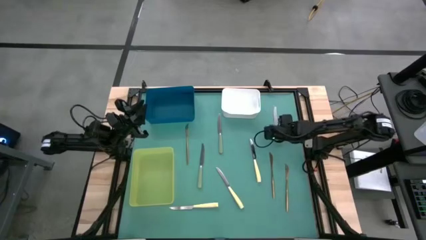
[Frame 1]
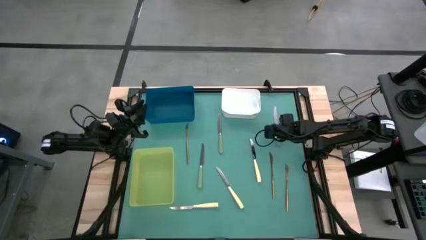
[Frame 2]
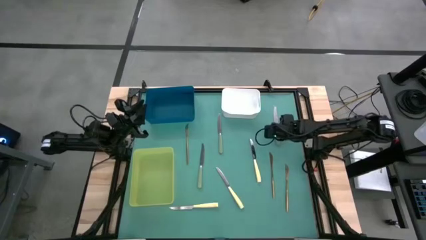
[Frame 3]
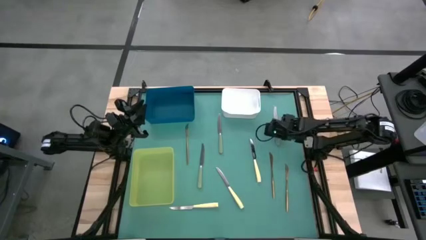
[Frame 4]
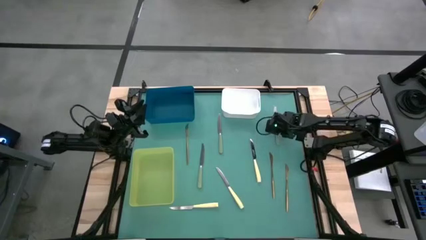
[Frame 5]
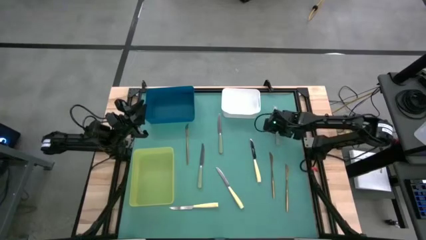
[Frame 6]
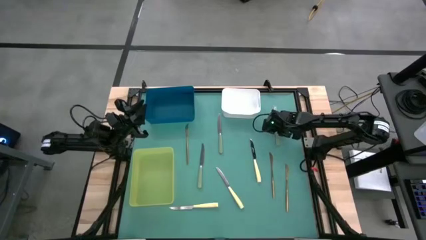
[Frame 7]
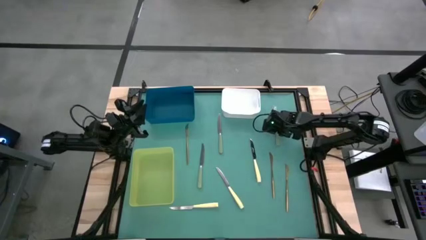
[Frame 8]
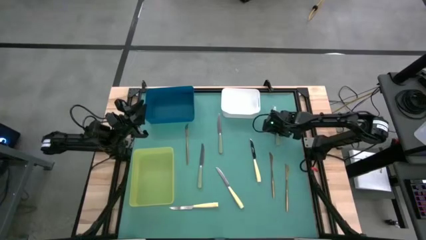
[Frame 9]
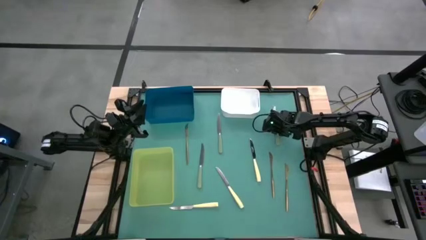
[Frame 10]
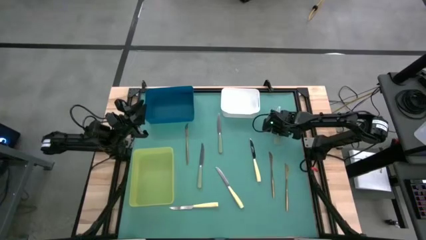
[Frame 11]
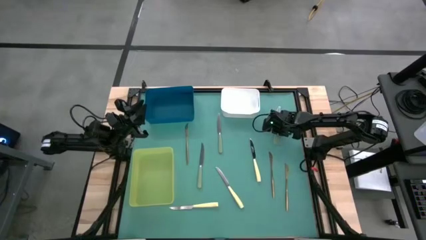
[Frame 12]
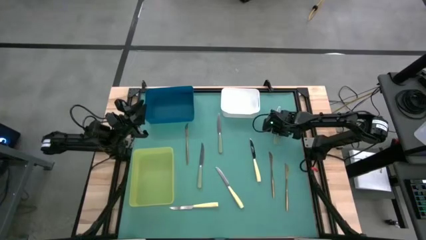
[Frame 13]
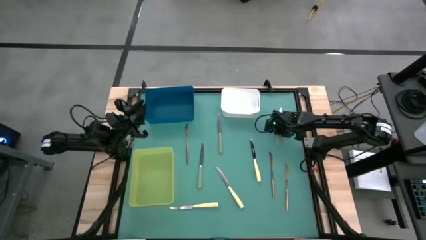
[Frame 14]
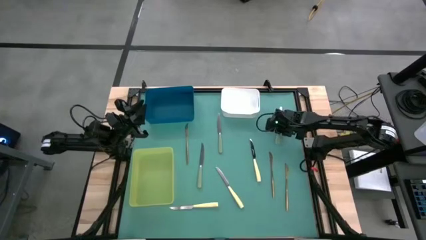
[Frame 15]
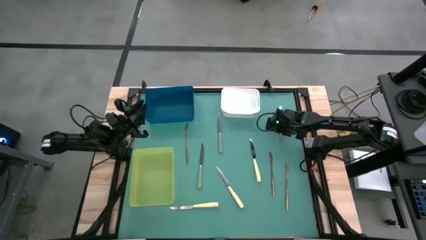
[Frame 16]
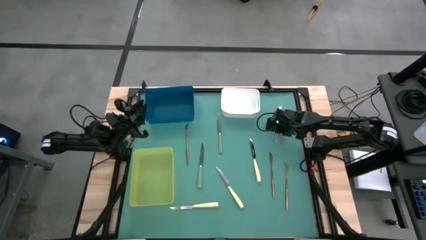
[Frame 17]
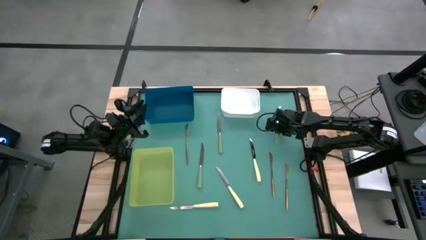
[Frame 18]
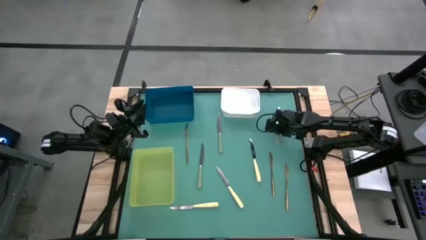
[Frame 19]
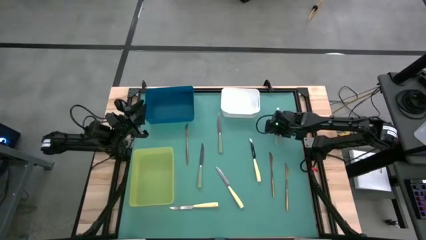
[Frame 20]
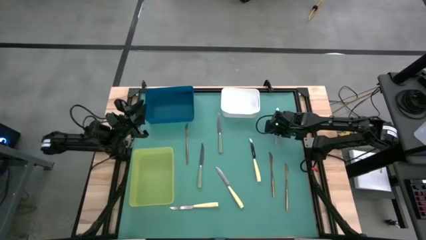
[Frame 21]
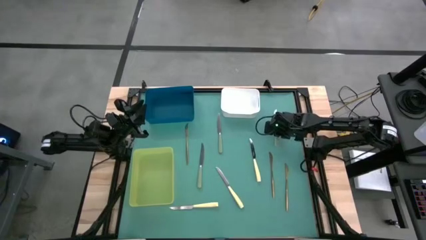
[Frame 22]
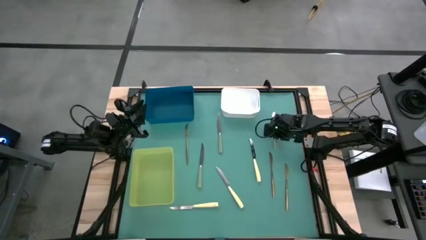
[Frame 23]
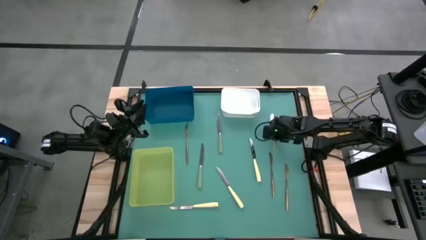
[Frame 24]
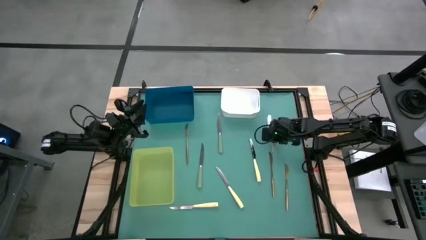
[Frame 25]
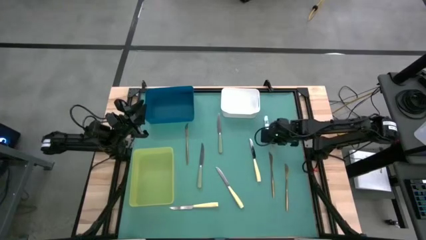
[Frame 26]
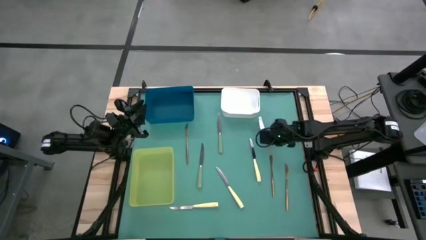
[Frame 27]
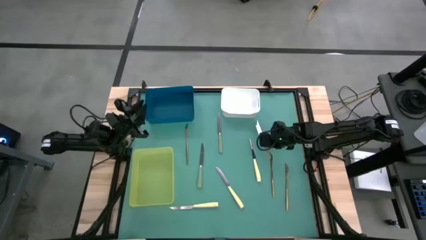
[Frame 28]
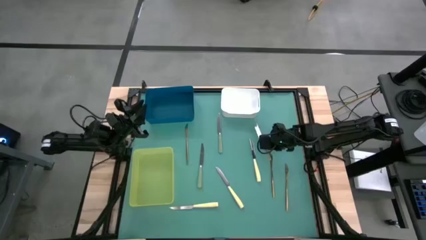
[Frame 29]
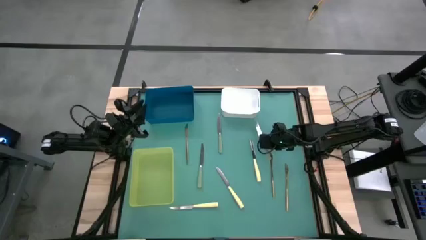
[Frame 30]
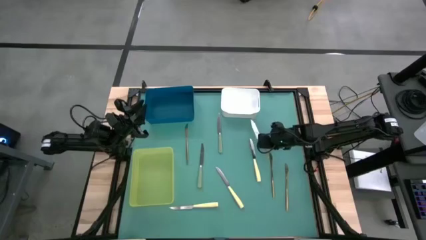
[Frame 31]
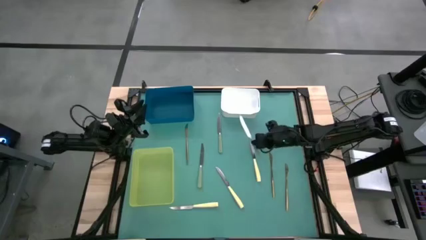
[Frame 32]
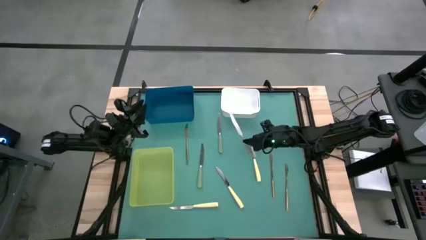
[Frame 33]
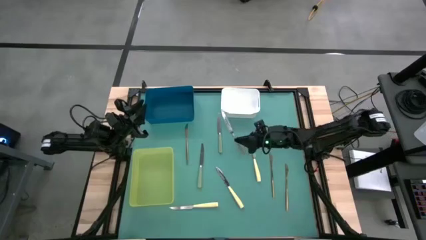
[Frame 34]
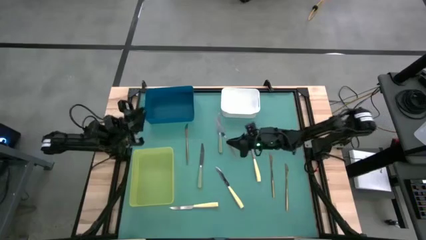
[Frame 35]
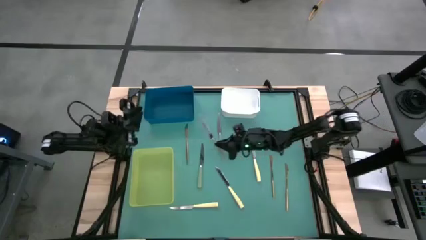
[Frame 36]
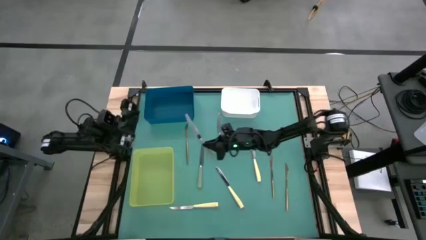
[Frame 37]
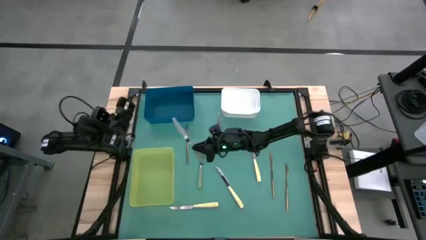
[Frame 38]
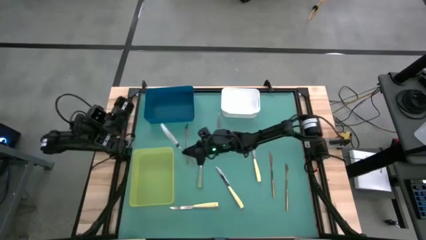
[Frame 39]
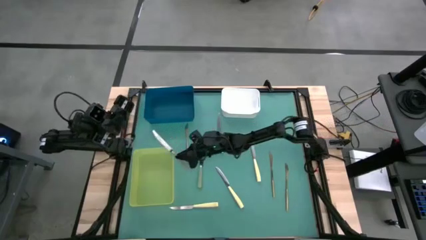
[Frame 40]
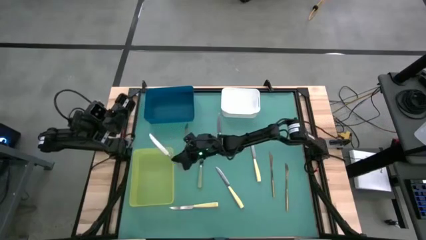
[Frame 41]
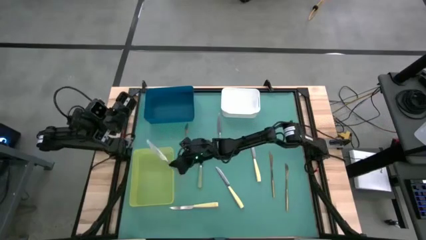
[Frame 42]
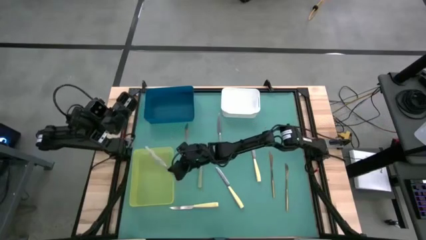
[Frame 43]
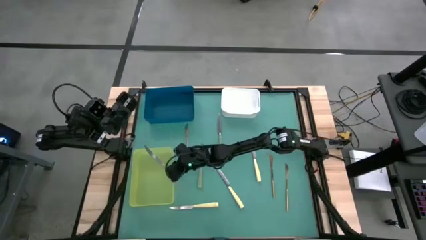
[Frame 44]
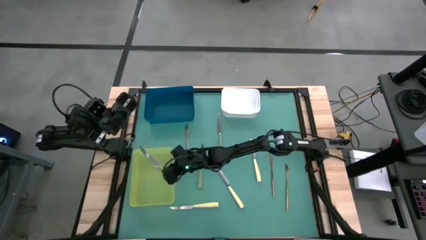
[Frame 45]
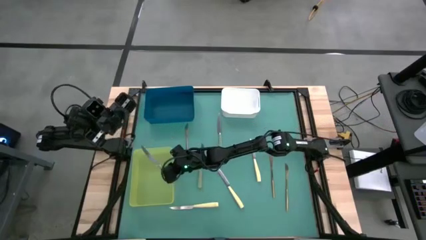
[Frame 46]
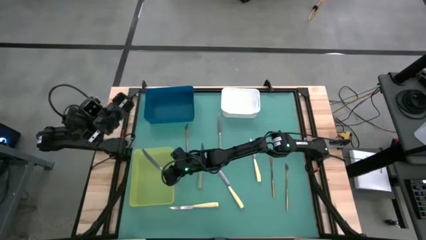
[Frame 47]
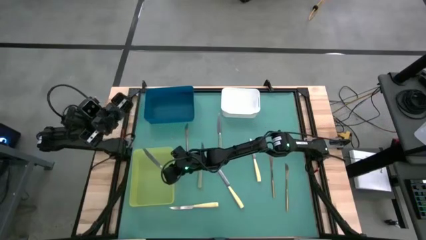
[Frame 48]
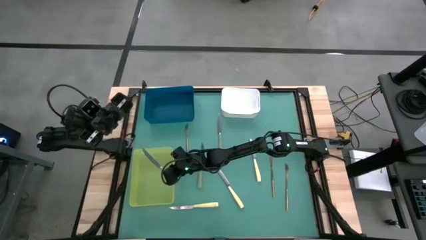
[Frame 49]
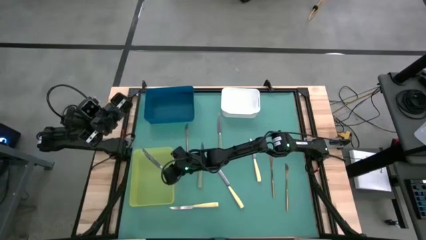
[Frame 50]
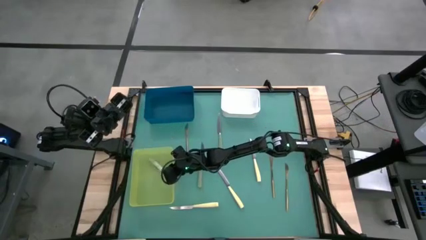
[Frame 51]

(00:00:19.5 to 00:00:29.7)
Task: Sort silverware by color (type)
Put the top right green knife into the green bin

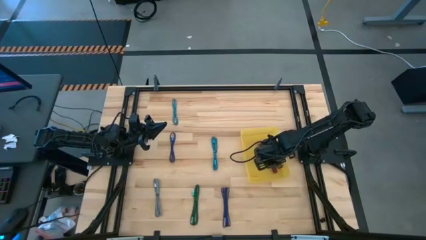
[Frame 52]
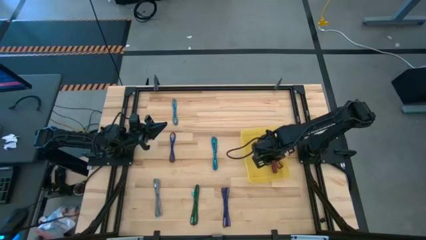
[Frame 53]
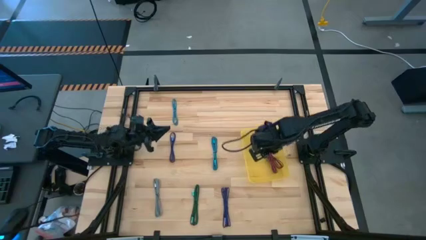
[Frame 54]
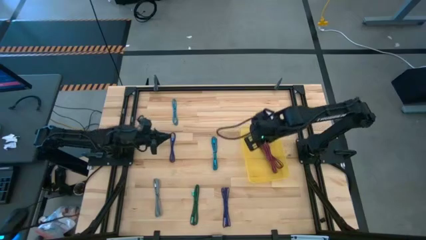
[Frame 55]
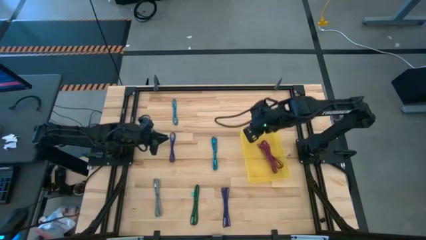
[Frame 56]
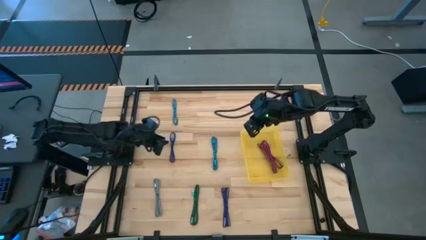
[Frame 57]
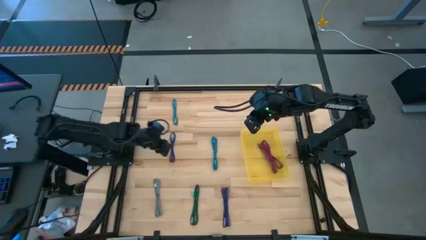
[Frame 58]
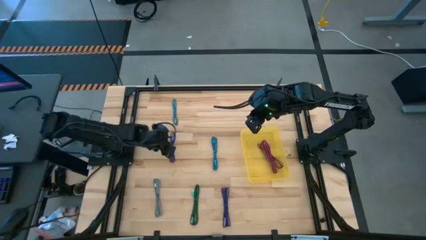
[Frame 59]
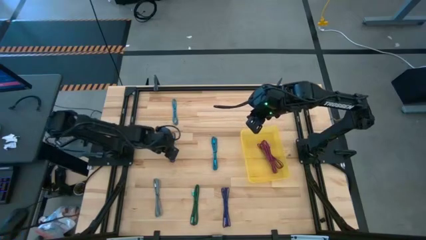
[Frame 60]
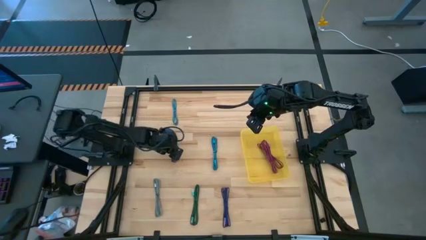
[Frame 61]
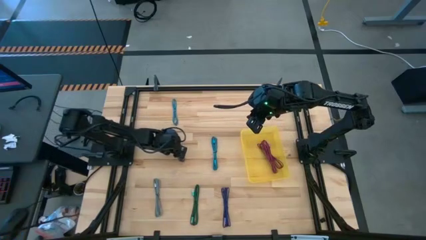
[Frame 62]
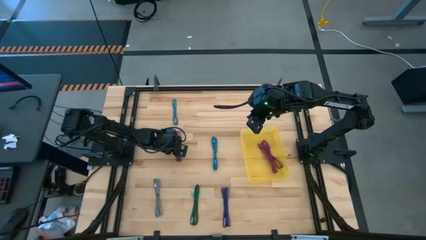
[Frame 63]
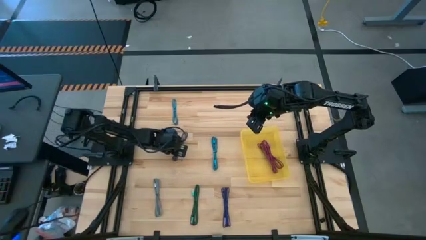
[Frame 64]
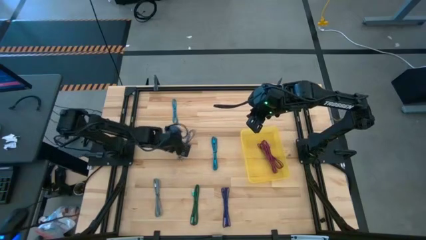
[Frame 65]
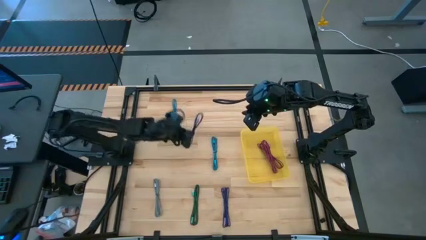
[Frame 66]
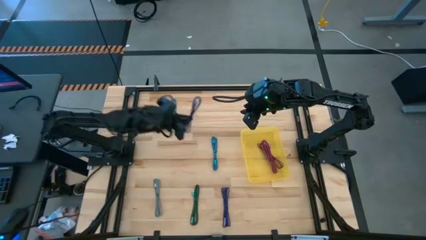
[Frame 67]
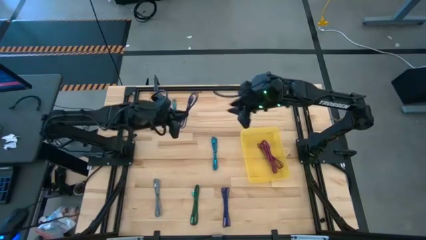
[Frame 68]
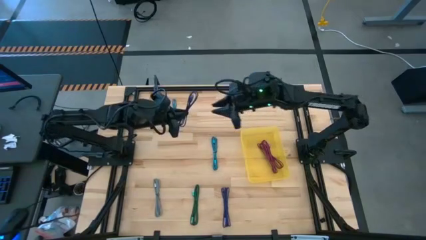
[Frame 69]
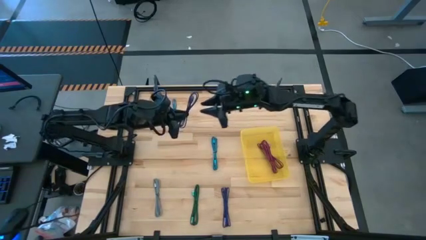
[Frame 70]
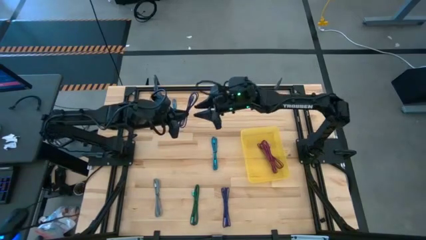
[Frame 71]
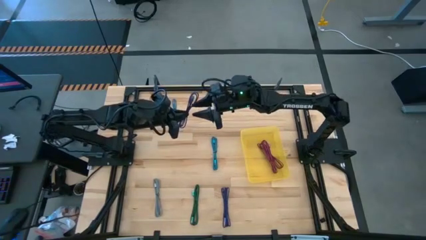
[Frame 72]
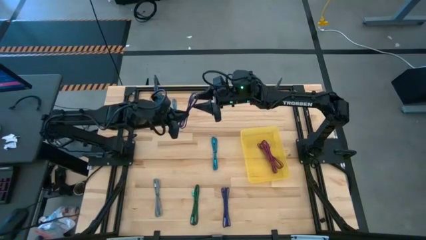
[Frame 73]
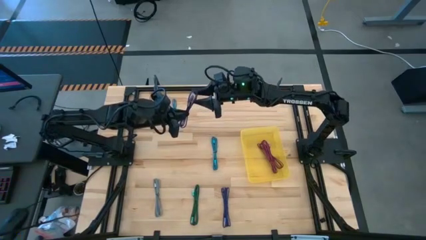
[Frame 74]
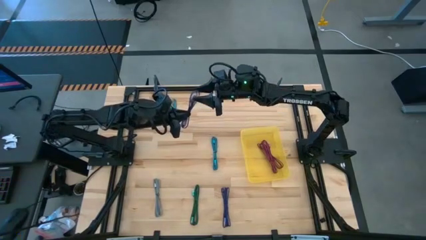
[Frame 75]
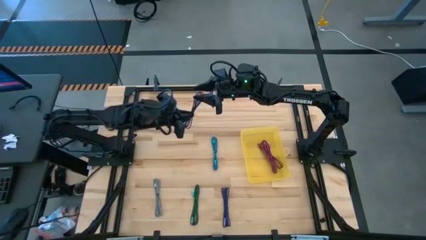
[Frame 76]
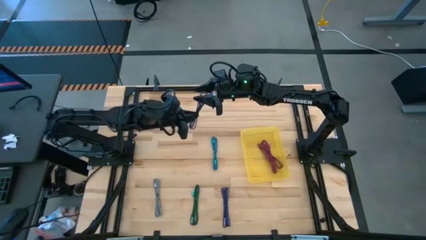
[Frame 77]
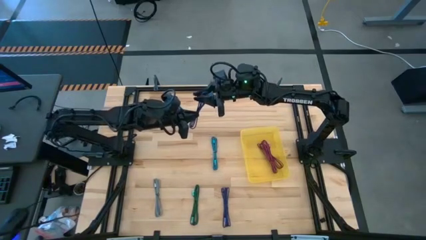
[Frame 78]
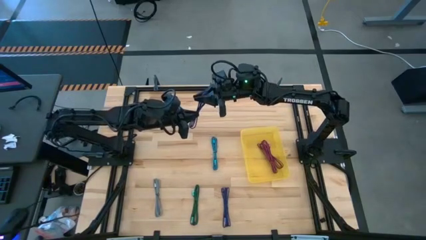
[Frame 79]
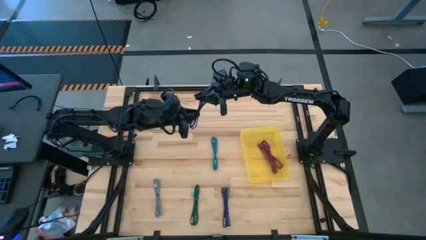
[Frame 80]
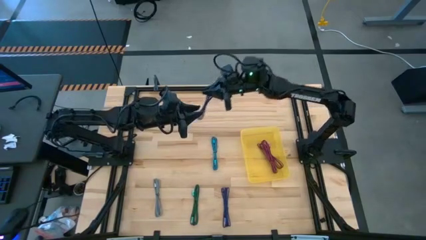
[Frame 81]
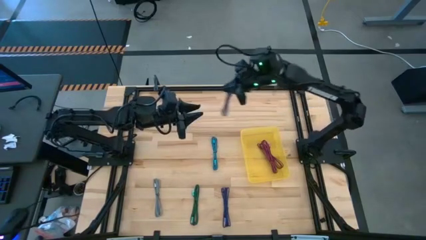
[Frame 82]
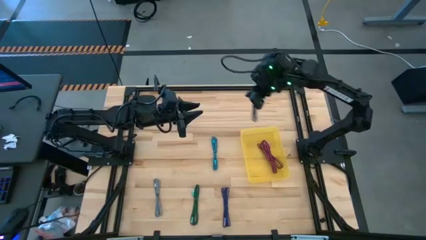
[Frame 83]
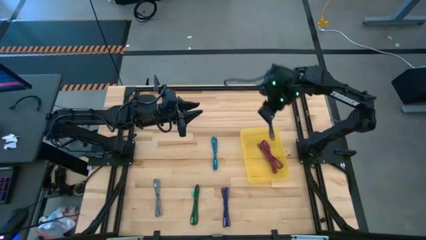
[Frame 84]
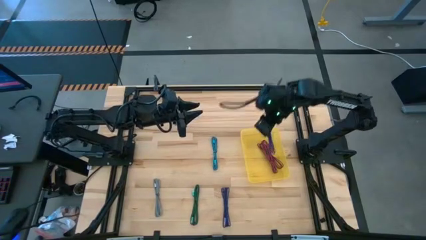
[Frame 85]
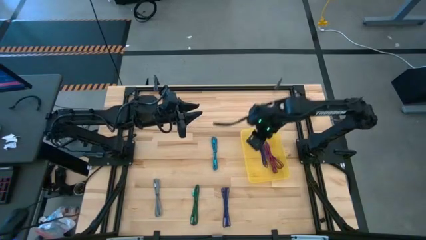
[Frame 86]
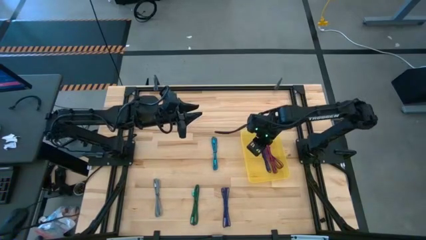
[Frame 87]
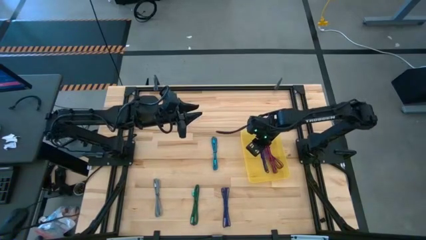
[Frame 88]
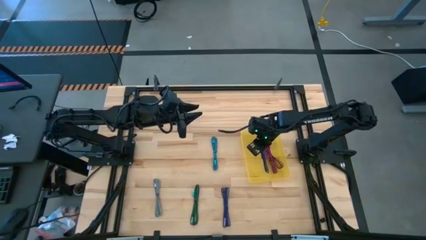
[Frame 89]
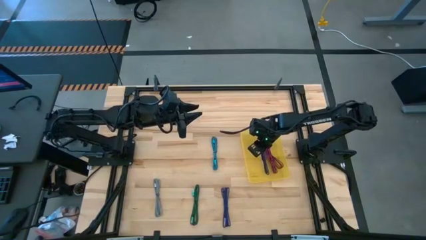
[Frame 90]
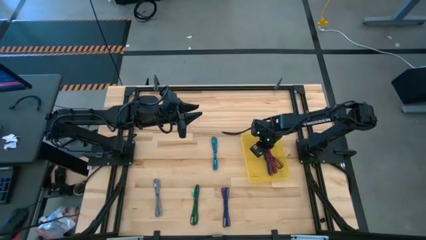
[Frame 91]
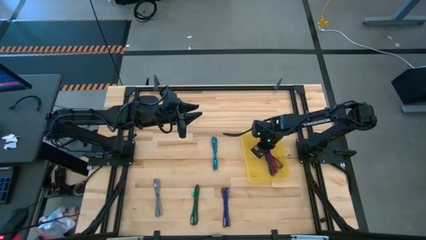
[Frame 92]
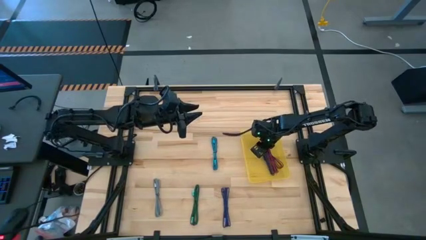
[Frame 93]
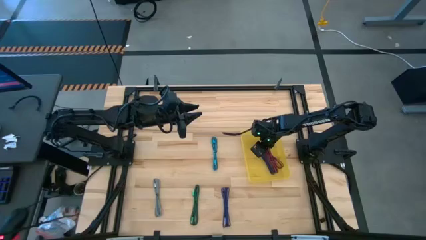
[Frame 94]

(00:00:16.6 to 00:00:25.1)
Task: Pick and place USB-C Cables
Put the top purple charger cable into the yellow bin
